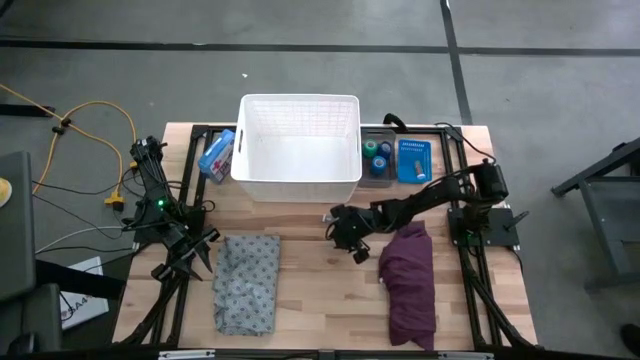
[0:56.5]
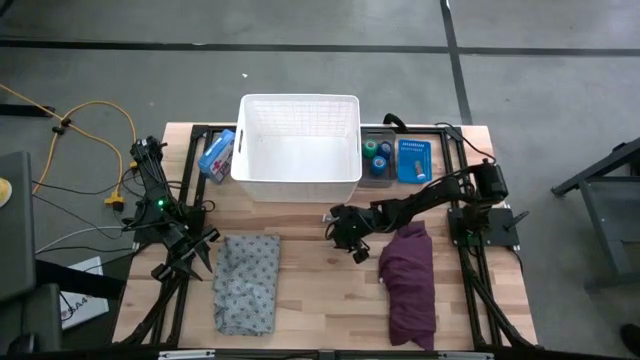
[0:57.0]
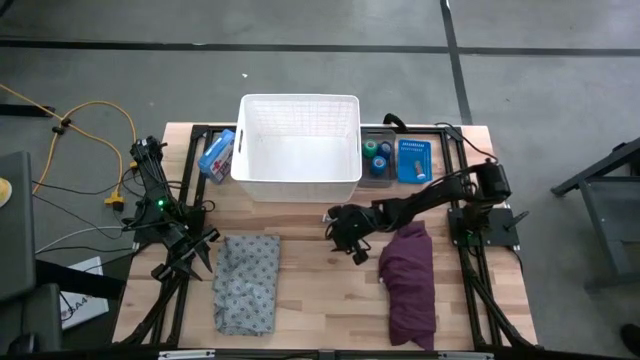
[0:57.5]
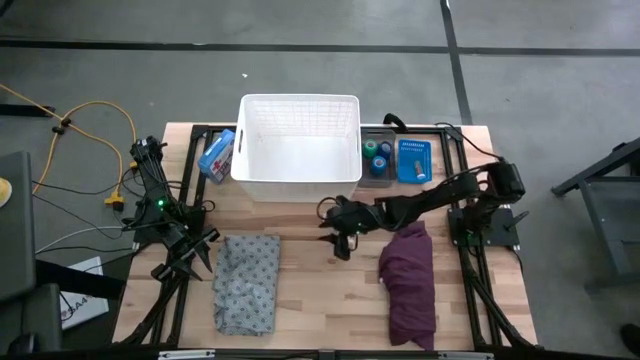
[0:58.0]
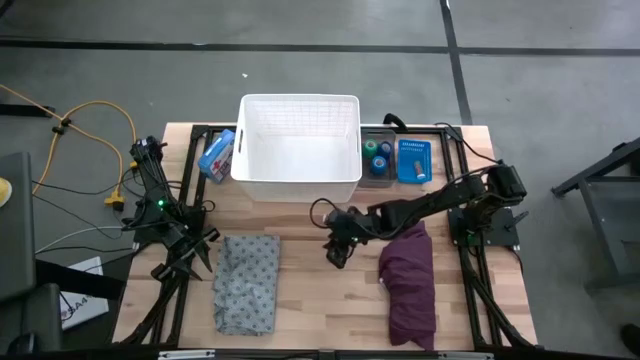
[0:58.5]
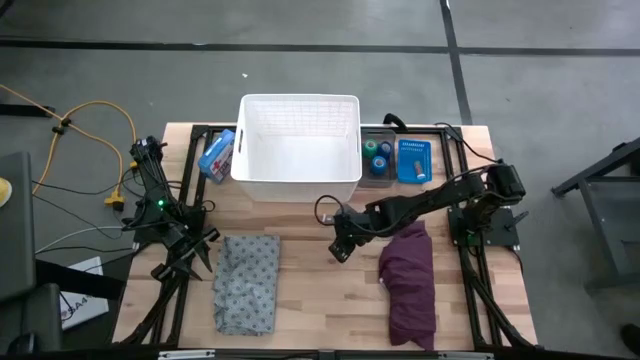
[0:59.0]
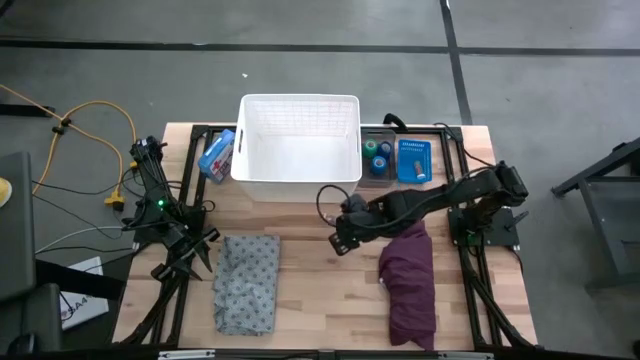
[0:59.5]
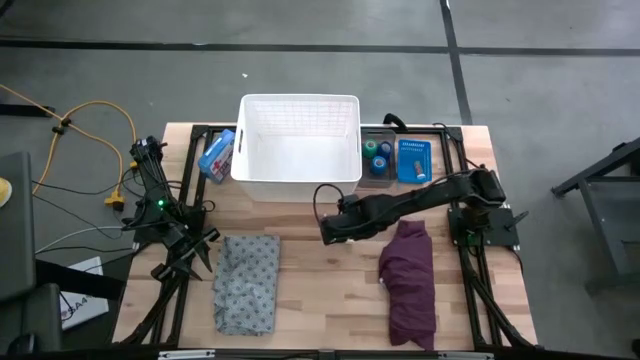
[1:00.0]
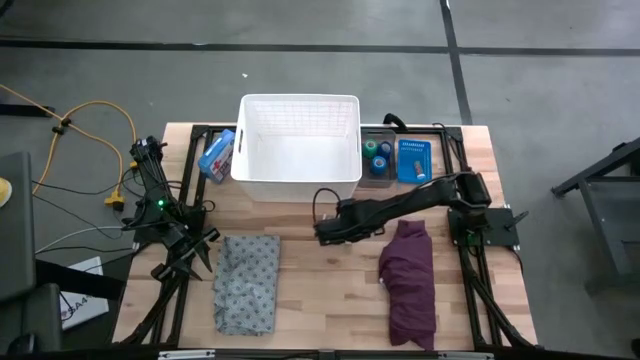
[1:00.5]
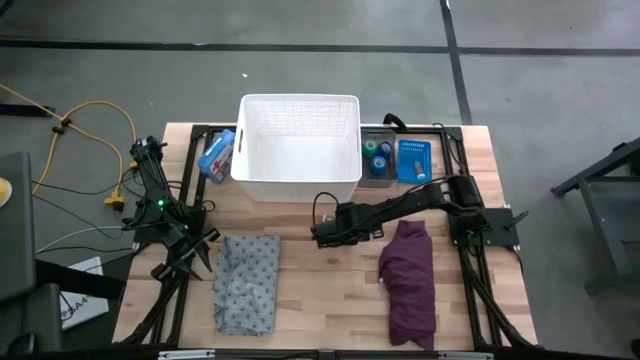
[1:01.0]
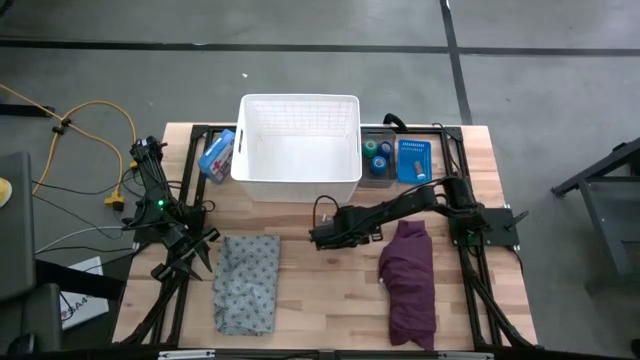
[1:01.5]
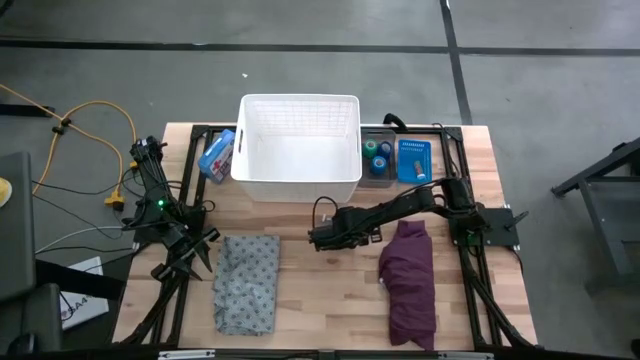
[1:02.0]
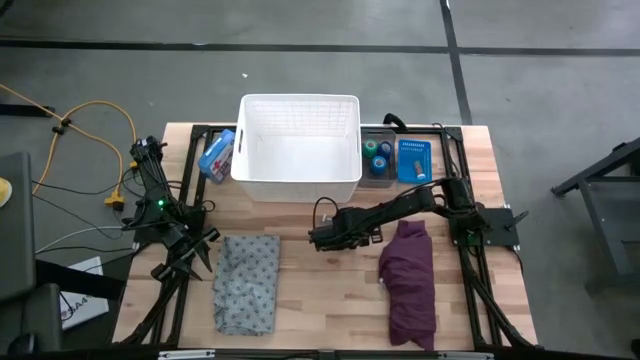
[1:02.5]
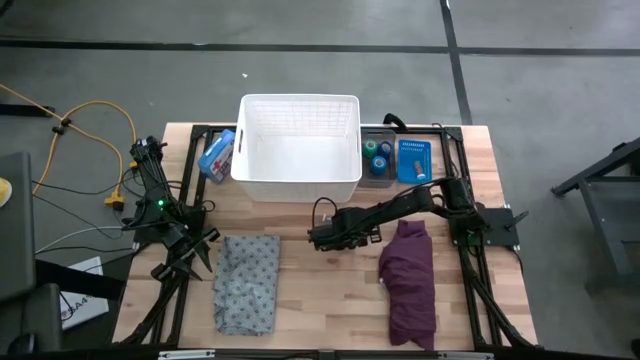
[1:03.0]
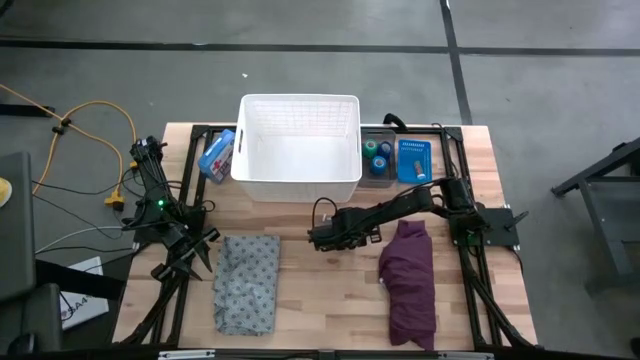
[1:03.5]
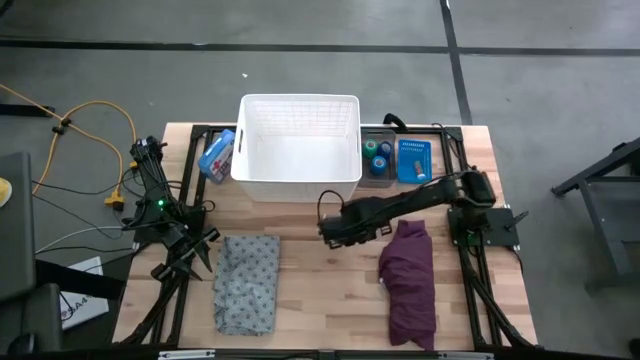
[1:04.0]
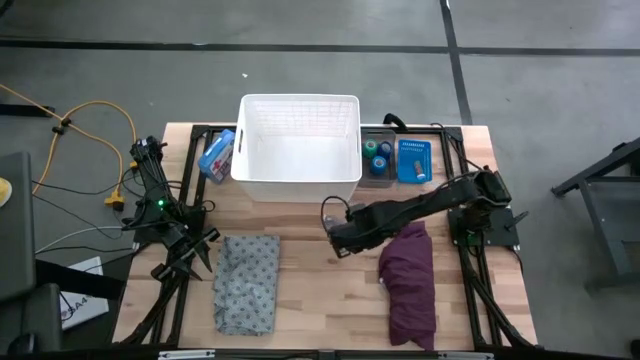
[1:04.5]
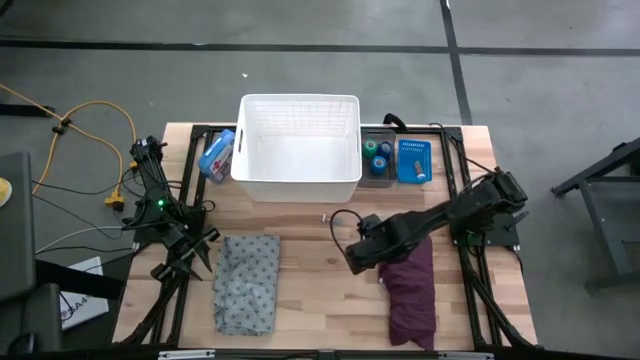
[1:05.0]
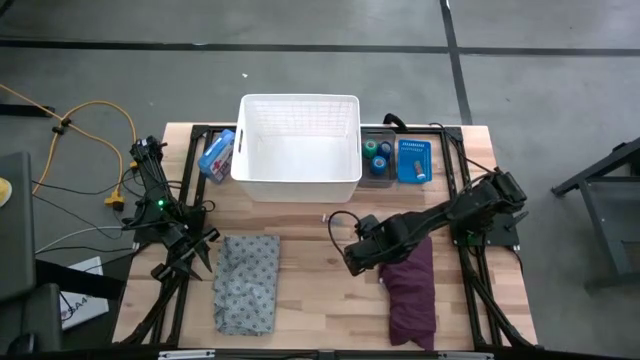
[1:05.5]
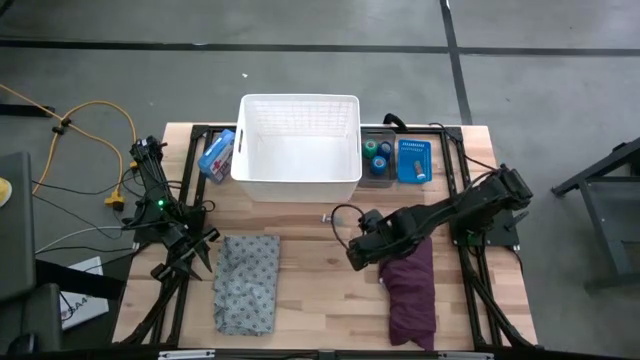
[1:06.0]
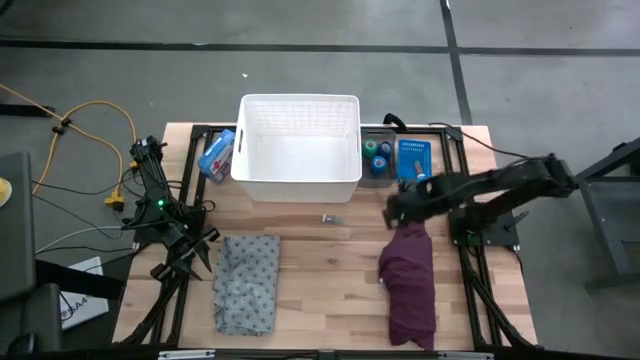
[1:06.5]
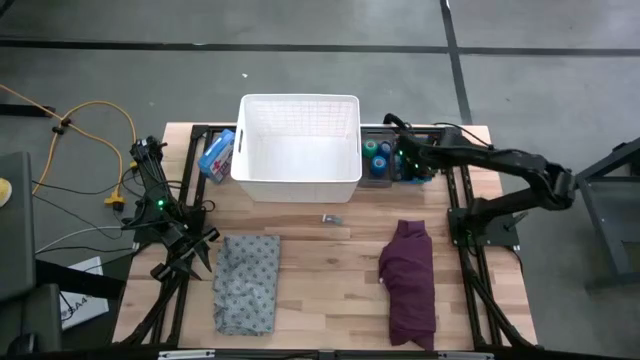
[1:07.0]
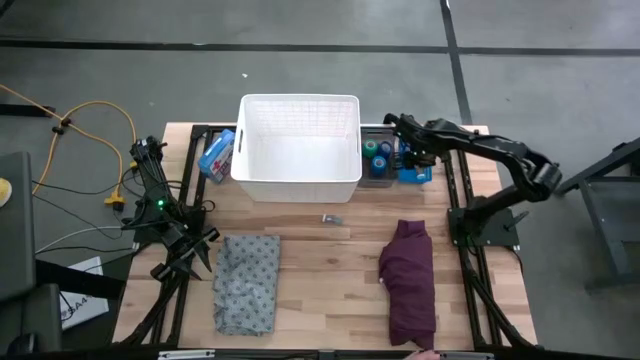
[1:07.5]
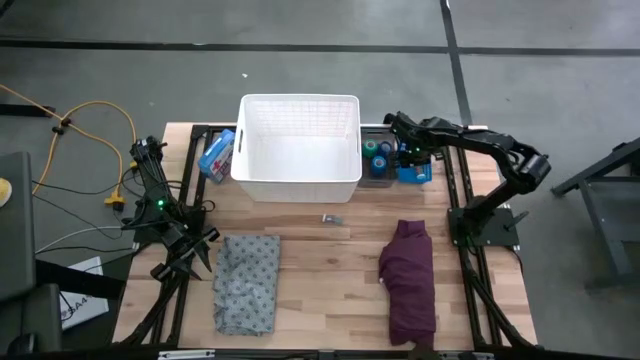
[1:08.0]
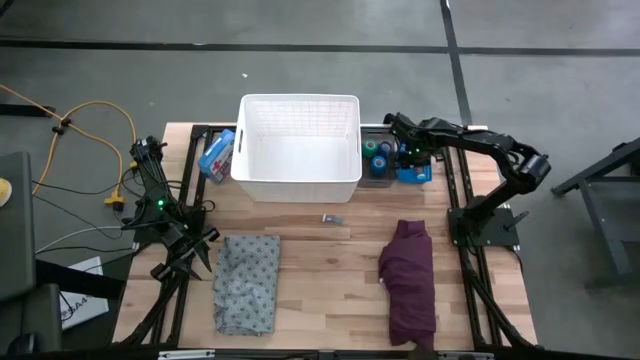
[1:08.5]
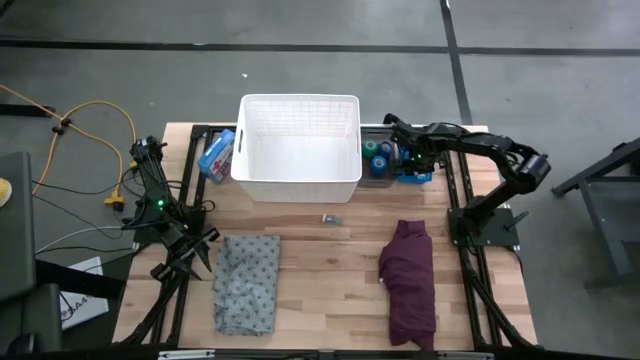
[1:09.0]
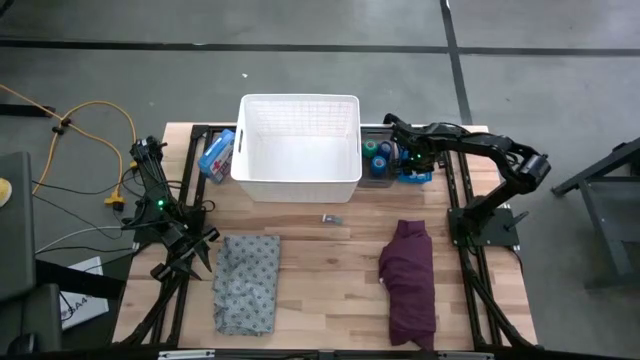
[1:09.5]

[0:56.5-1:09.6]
Task: Pick & Place Medicine items
Put the yellow pill bottle into the blue bin

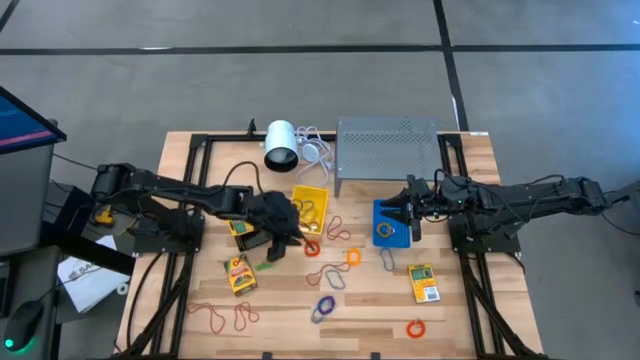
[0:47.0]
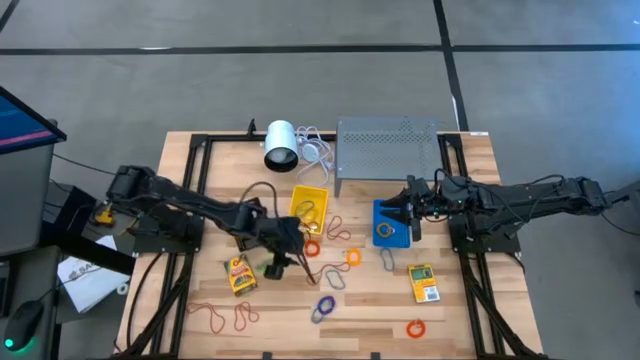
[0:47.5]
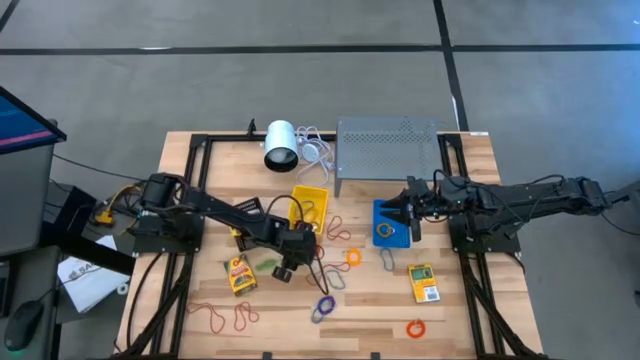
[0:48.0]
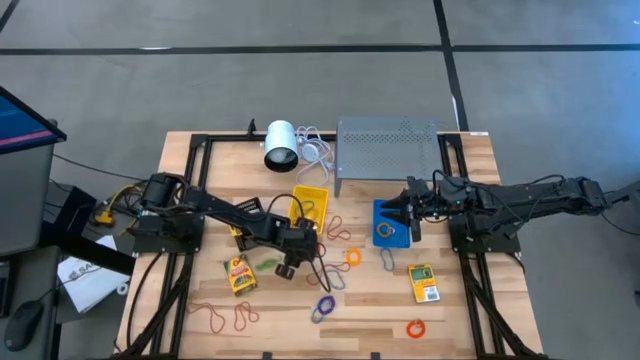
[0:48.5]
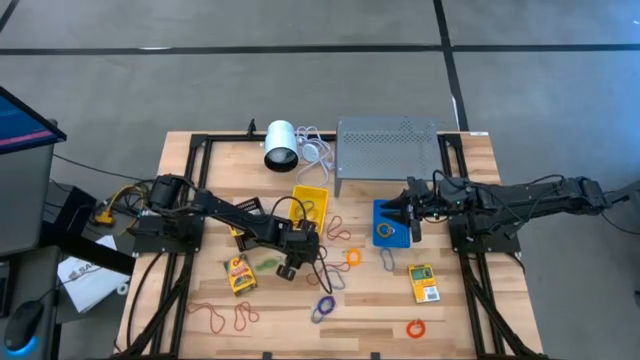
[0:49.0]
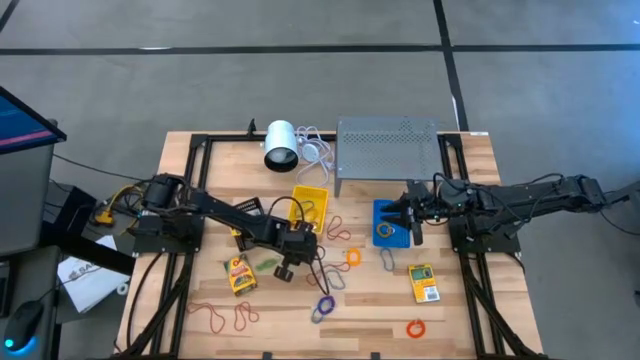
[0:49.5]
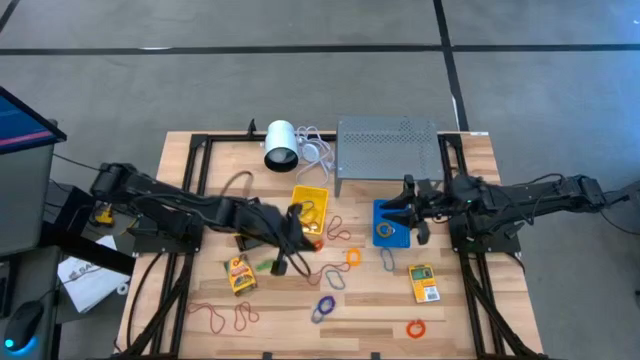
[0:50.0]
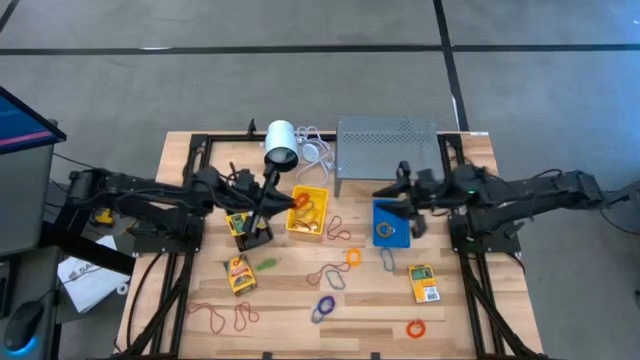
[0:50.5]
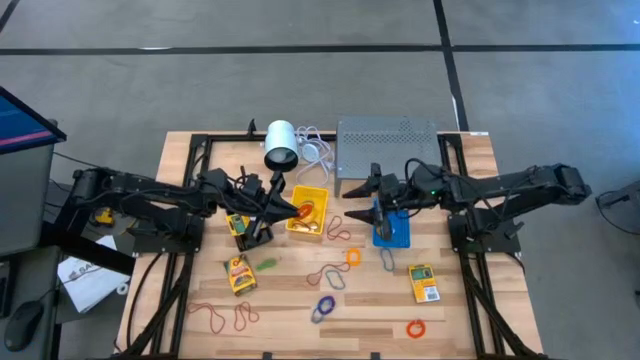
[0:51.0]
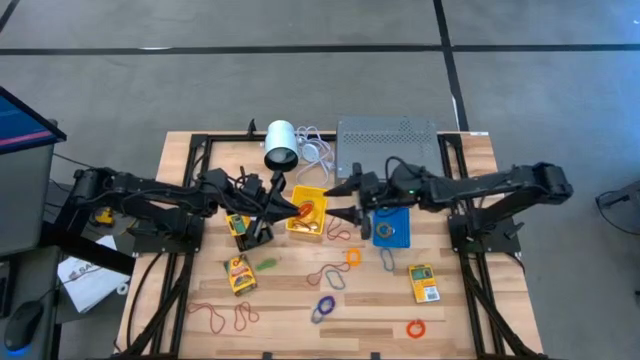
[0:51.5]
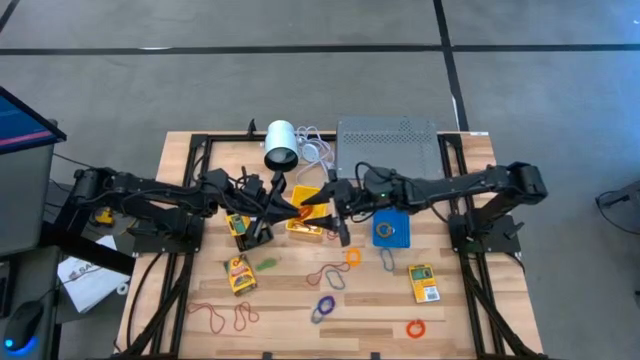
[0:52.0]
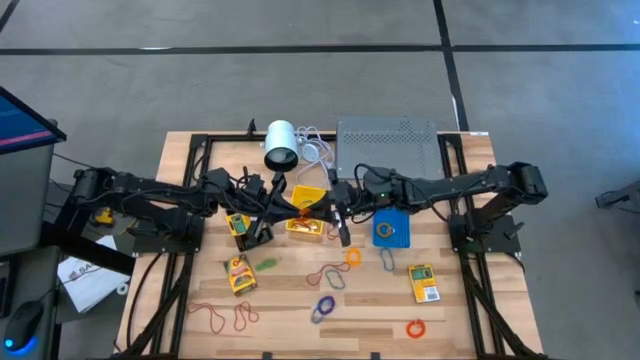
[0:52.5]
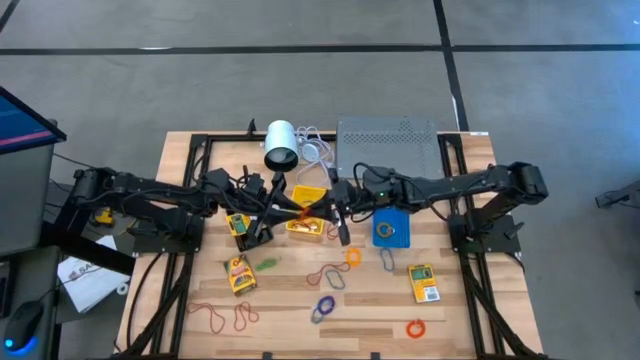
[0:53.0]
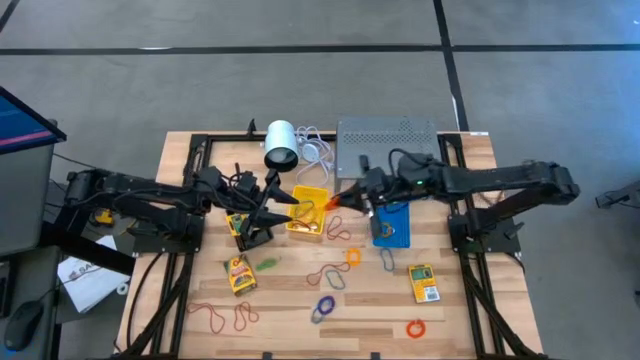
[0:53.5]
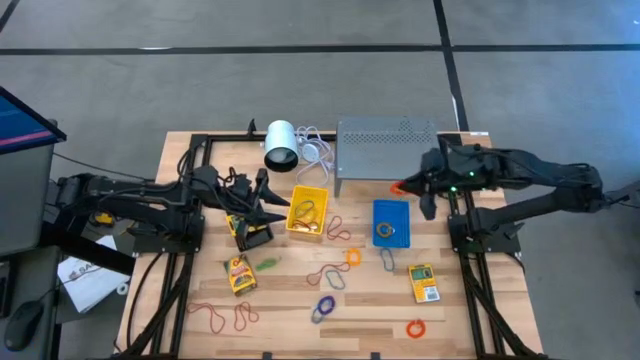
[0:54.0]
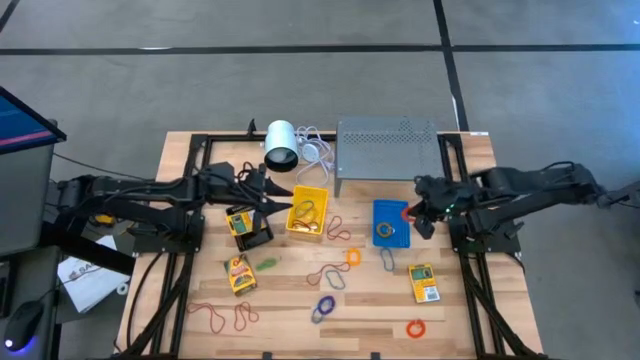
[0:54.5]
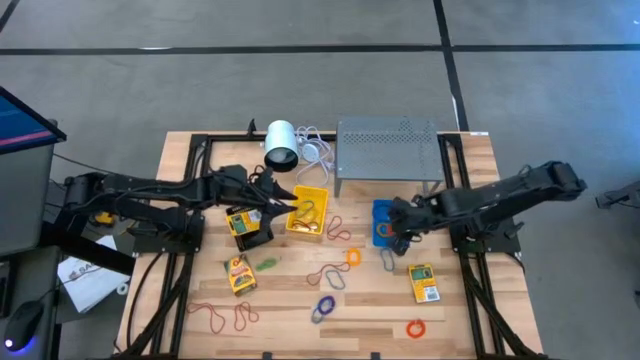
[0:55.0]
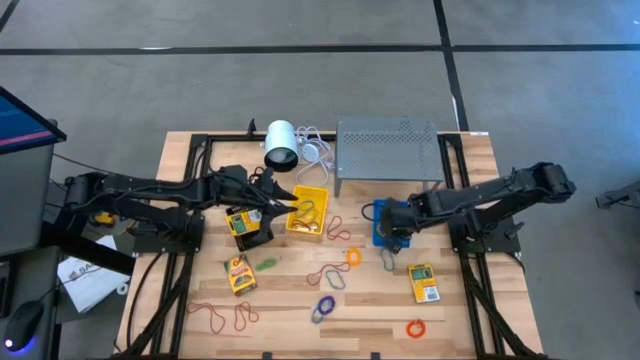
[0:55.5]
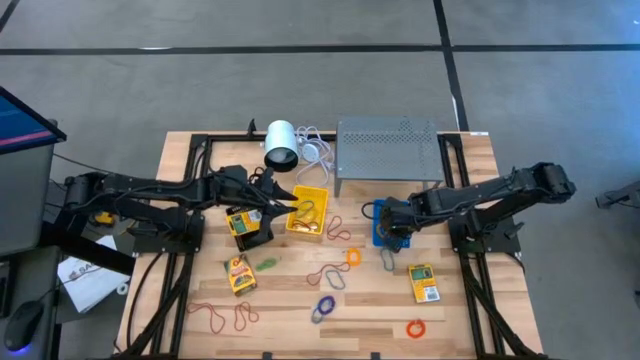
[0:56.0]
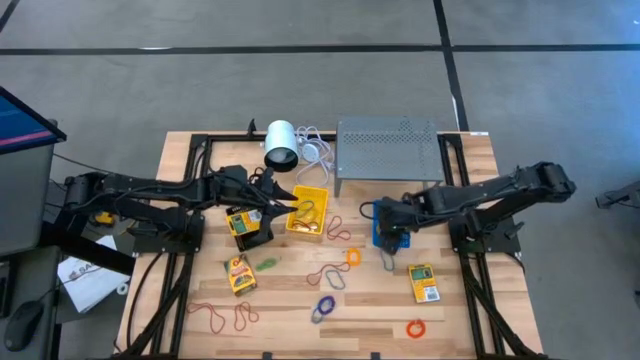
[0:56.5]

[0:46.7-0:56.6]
Task: Pick & Place Office Desk Supplies
Put the left orange elastic key ring into the blue basket
